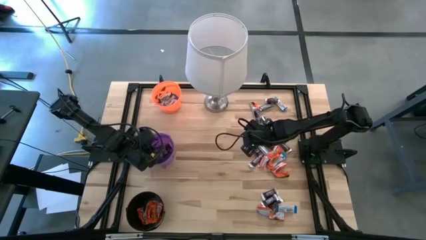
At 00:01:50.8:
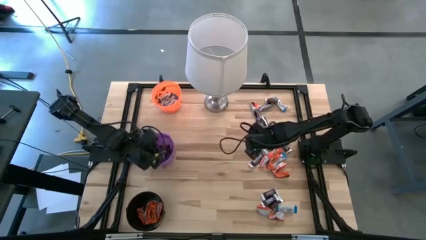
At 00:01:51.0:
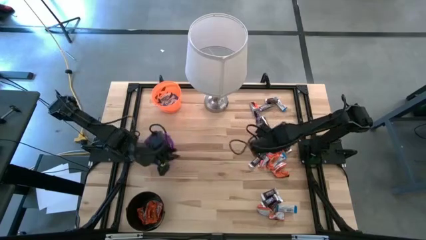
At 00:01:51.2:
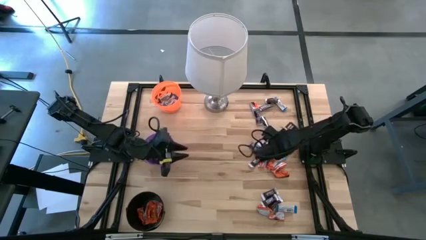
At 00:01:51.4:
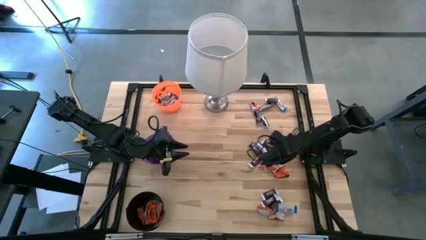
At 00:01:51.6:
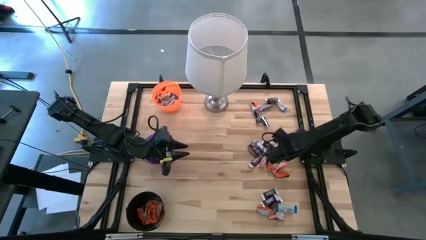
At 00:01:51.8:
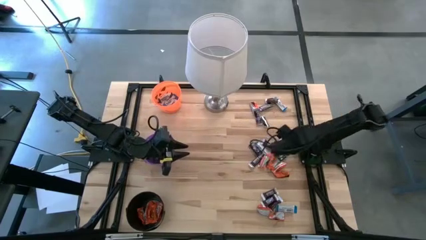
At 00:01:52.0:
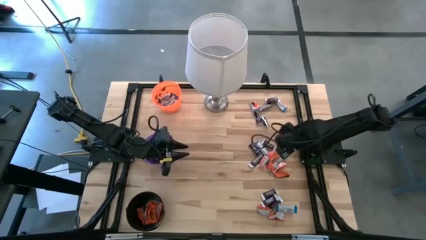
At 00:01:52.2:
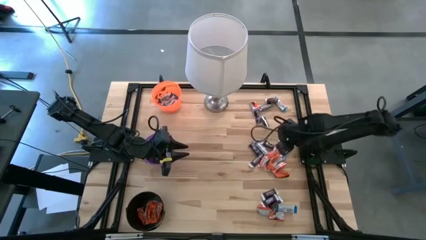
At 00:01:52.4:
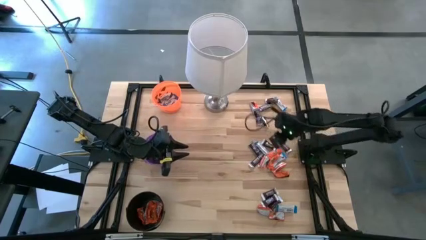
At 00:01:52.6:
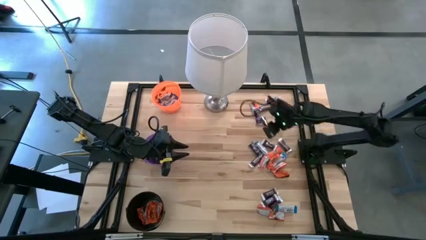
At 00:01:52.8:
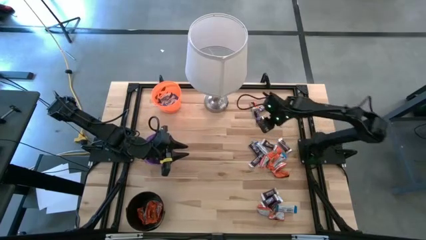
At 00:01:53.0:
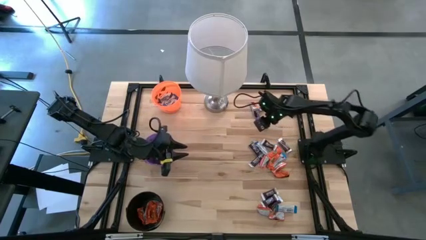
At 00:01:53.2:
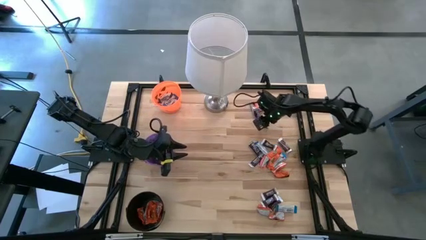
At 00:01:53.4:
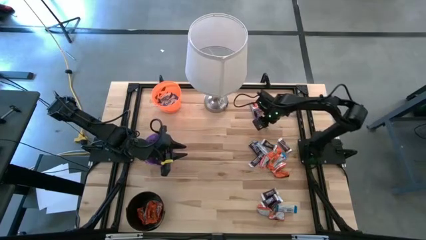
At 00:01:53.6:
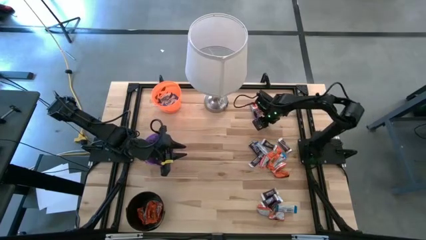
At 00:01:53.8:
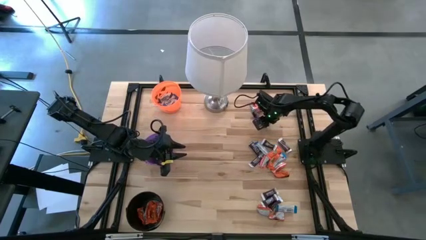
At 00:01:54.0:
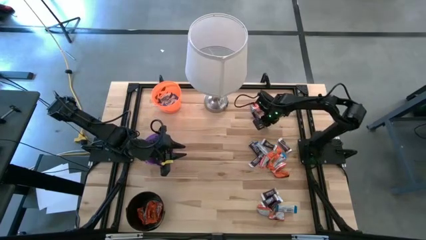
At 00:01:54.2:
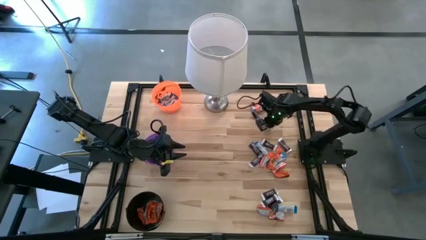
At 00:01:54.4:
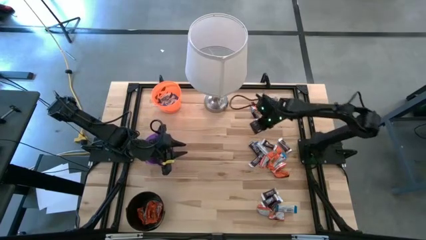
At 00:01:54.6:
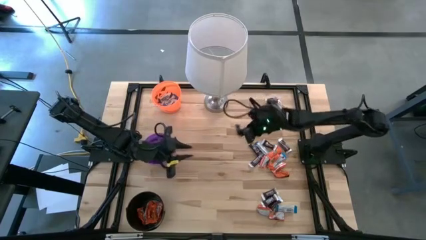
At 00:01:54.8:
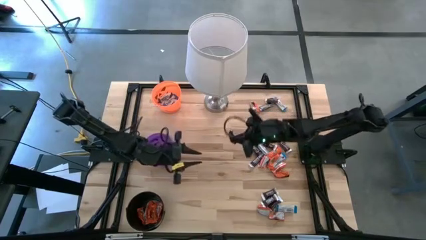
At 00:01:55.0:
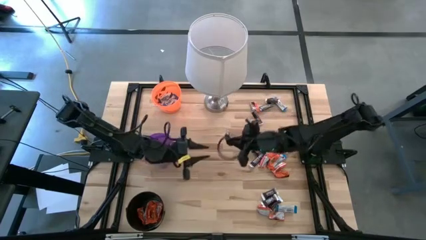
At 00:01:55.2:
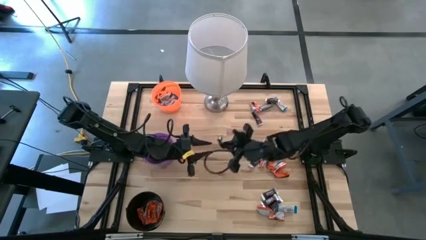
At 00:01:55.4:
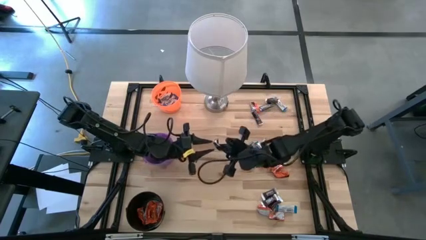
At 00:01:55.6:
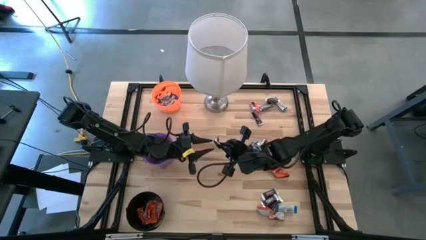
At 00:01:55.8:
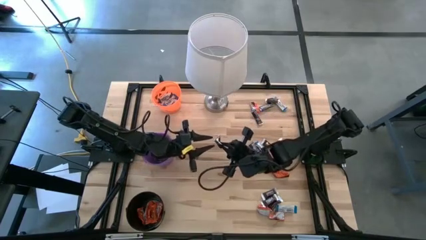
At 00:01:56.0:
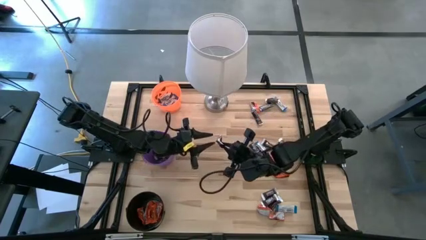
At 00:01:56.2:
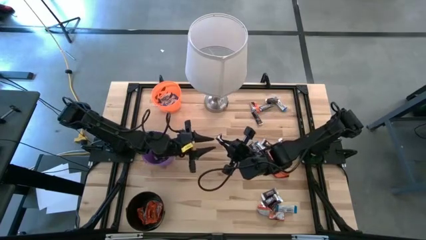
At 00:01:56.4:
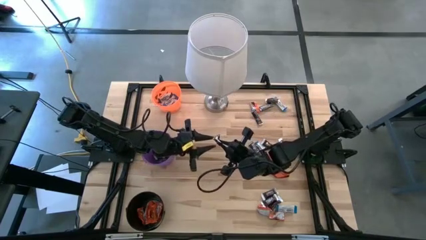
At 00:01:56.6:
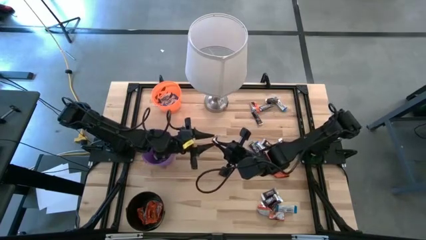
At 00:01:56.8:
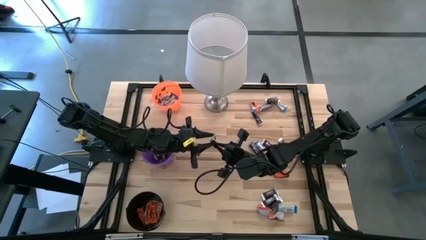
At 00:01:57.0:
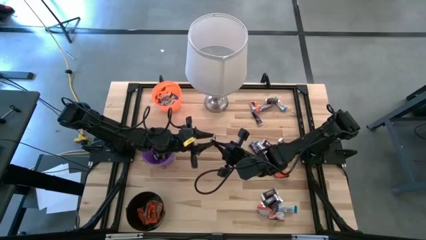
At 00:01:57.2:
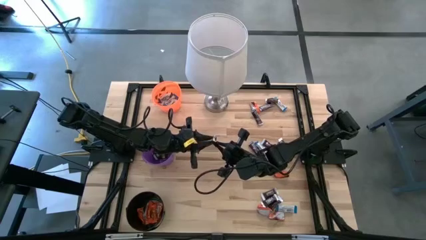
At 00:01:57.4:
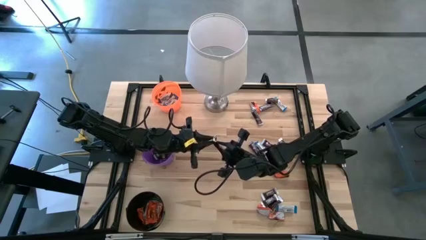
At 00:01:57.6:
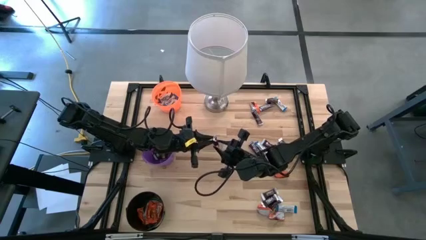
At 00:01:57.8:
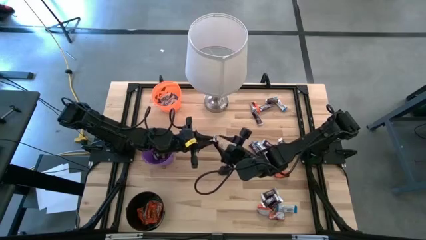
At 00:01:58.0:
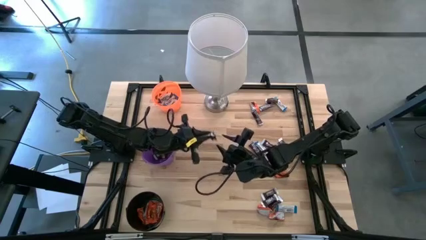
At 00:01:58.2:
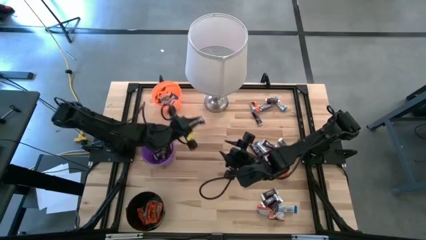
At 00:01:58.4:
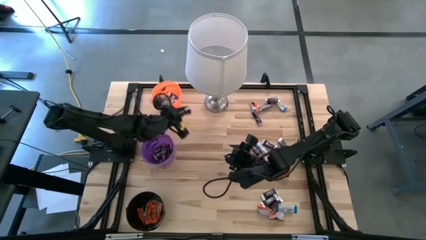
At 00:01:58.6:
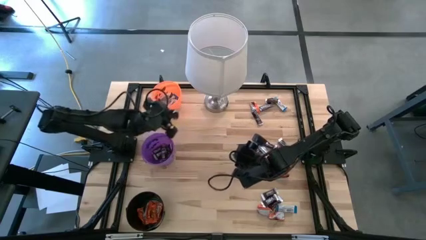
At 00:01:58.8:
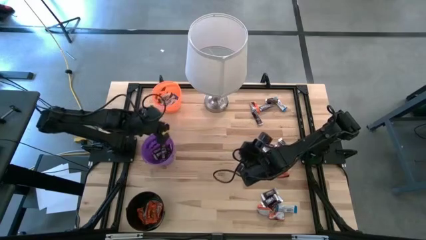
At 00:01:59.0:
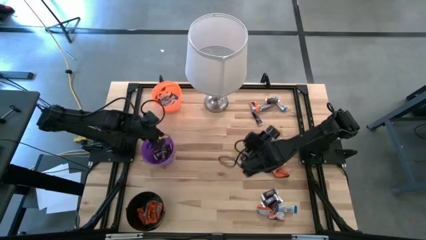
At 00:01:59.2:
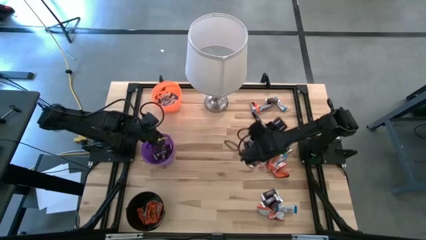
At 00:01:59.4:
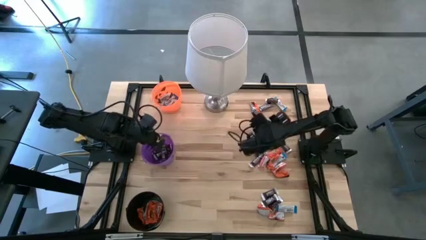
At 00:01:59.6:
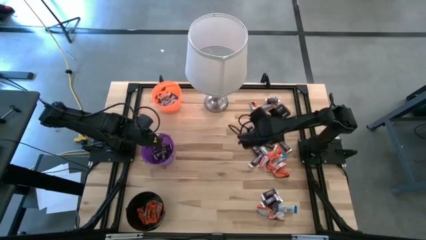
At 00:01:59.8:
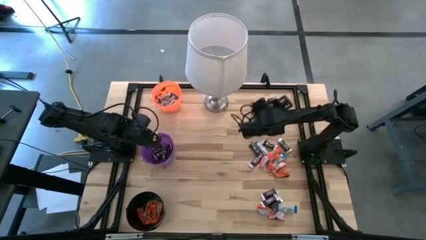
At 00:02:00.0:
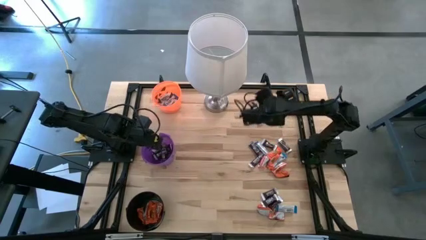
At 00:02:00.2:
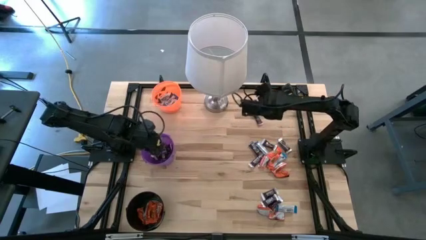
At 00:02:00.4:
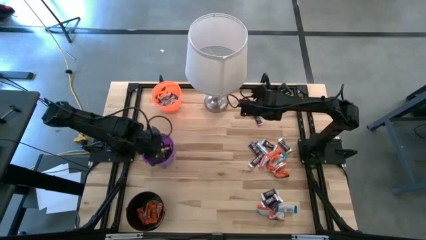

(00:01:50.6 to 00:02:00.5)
Task: Sort candy
Put the brown chocolate into the purple bucket

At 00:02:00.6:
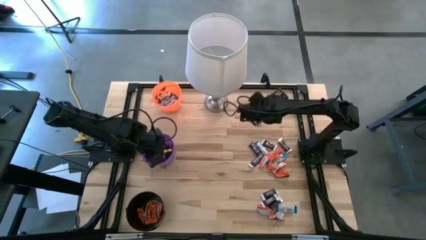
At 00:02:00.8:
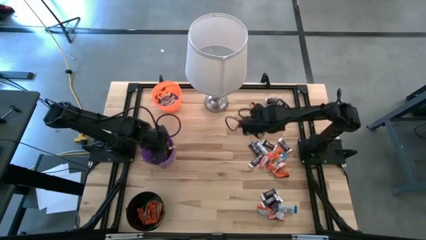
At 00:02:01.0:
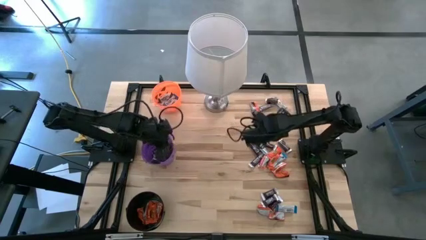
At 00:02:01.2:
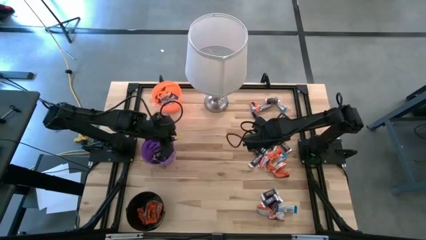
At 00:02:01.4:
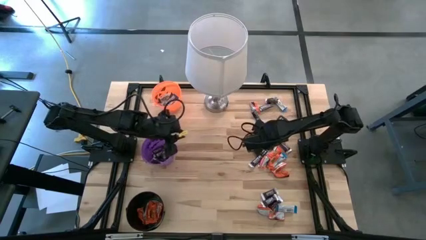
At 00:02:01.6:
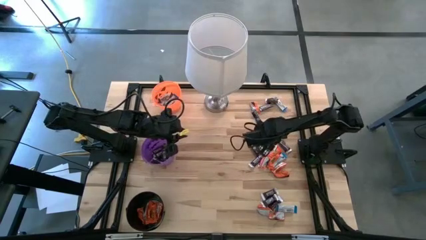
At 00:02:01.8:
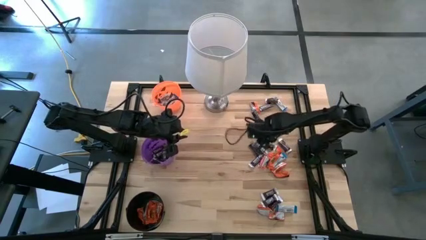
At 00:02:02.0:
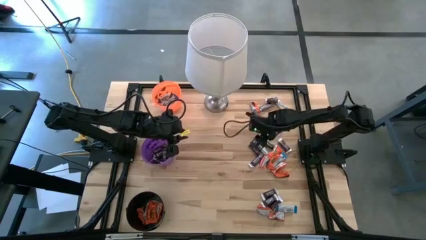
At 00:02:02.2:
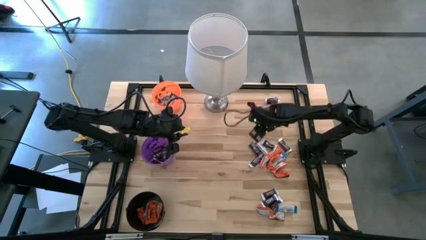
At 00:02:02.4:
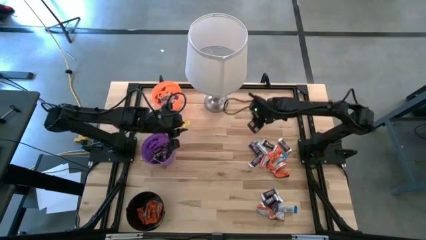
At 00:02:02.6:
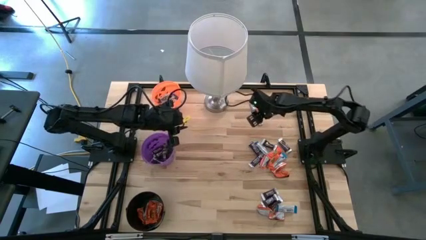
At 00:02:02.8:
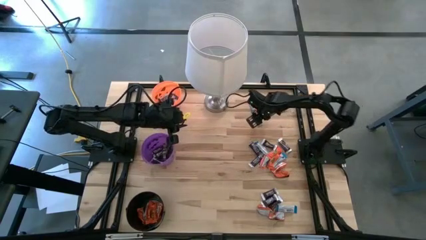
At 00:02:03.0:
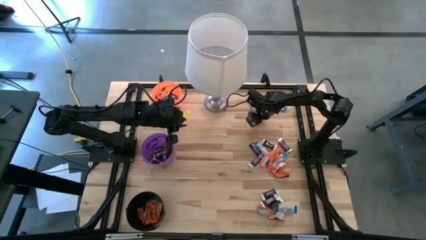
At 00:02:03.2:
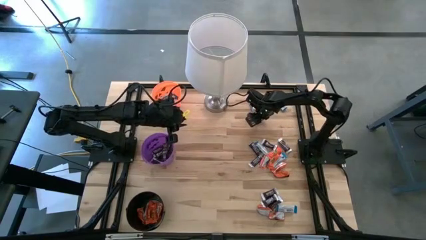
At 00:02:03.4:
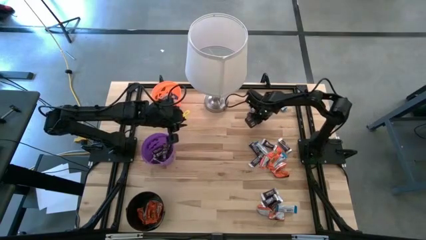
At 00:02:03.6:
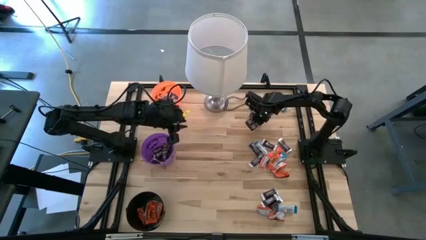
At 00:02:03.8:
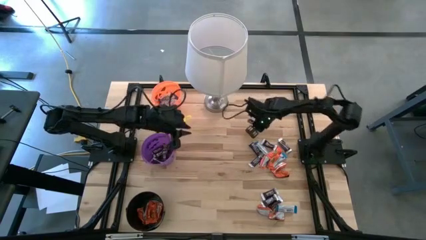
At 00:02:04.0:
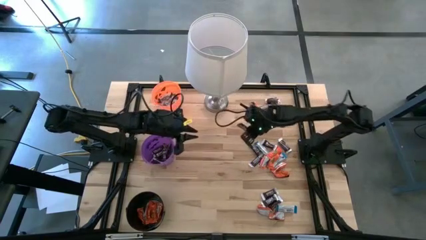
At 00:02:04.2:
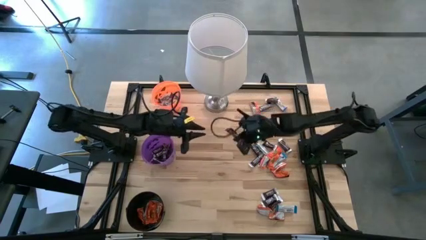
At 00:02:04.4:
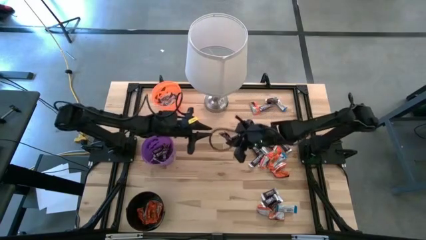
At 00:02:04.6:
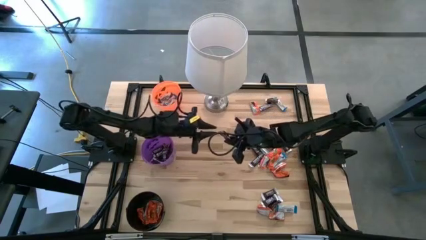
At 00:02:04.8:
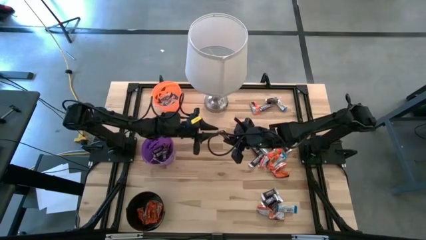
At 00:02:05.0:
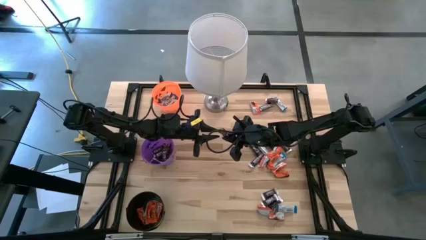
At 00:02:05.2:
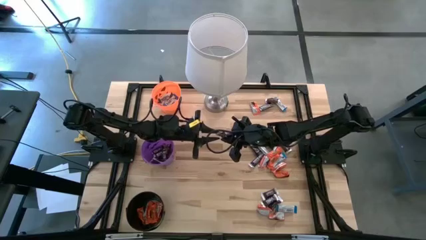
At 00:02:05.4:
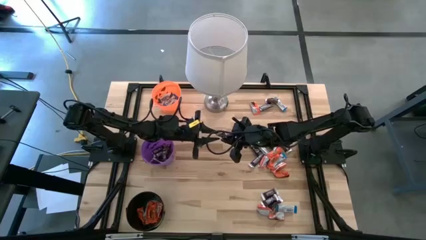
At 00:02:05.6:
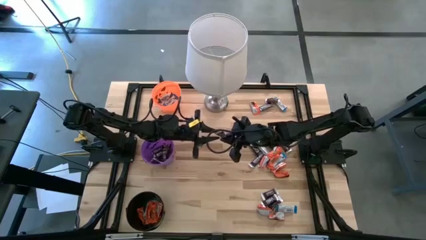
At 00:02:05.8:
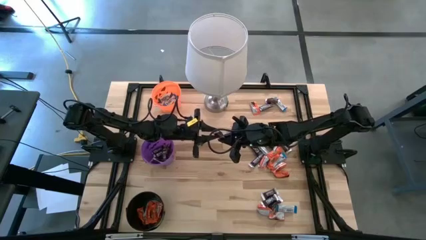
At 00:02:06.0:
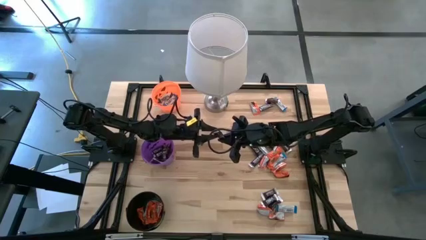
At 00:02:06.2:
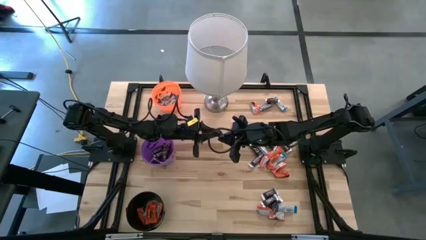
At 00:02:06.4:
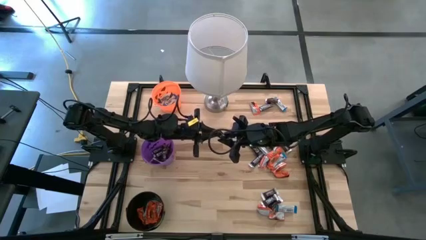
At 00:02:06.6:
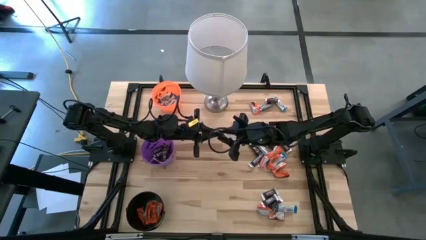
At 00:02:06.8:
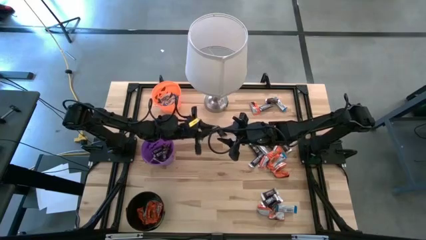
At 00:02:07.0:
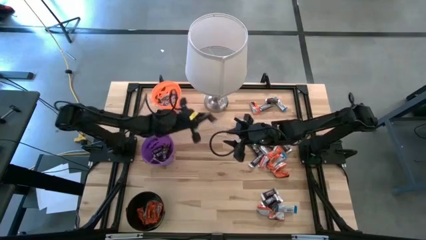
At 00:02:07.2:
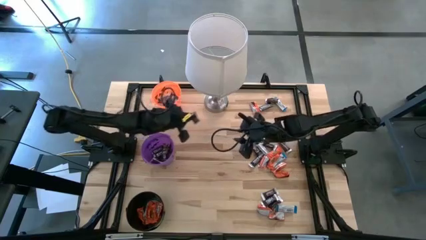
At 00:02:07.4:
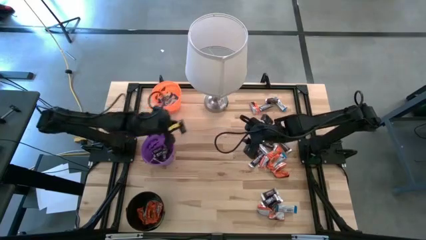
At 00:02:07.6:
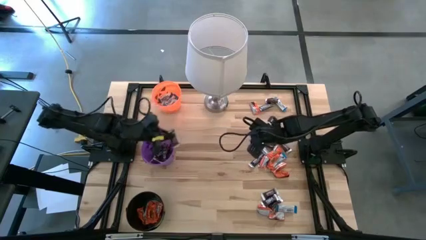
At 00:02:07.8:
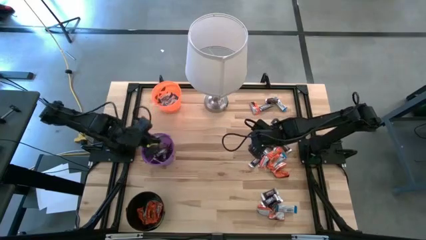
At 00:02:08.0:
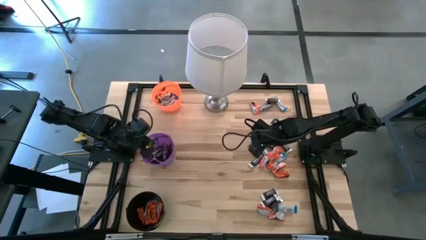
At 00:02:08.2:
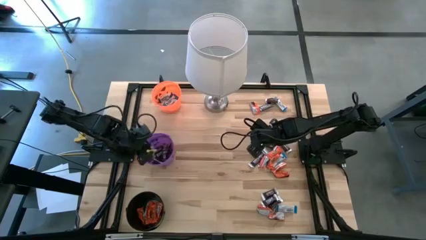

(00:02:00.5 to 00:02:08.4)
Put the brown chocolate into the purple bucket
